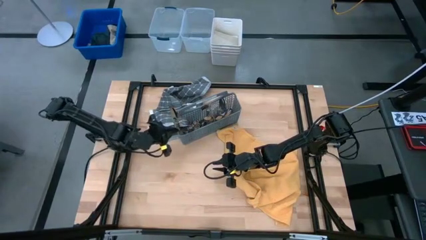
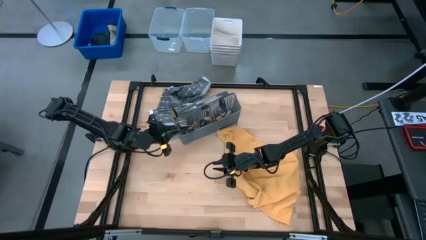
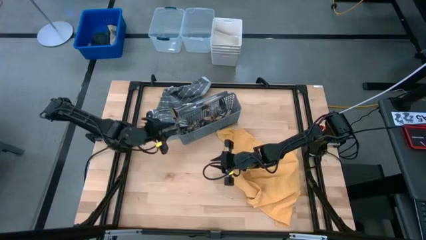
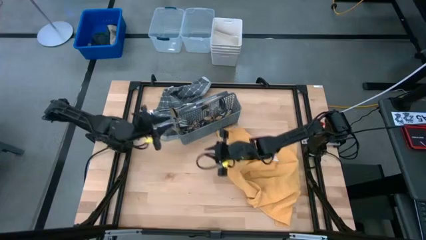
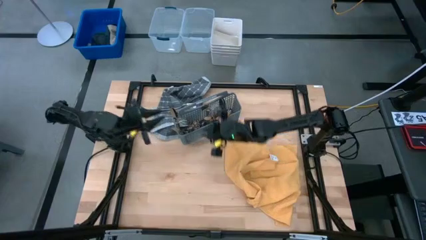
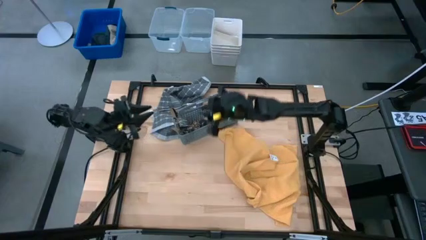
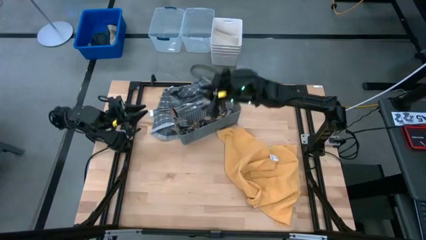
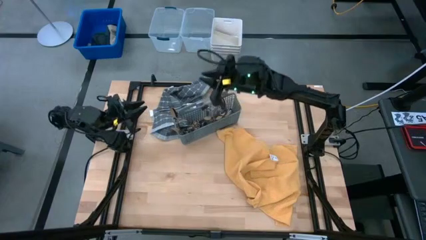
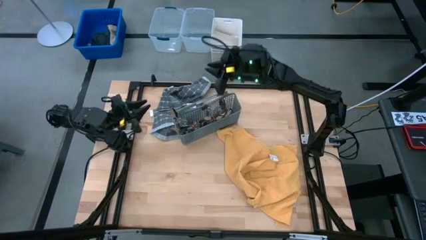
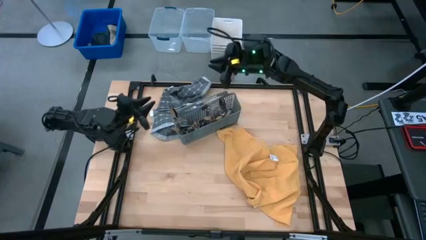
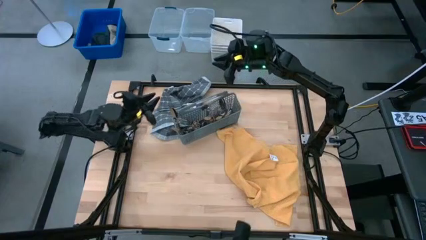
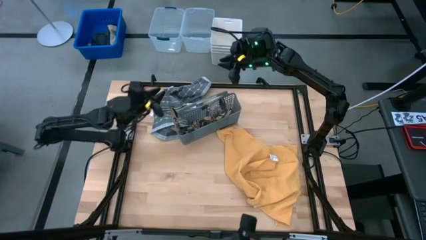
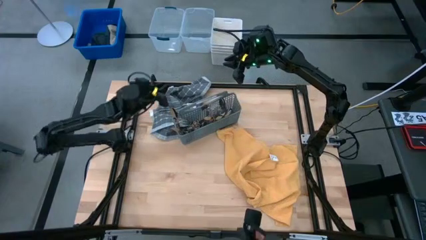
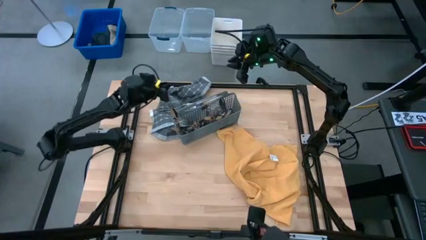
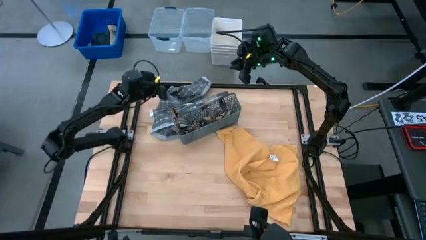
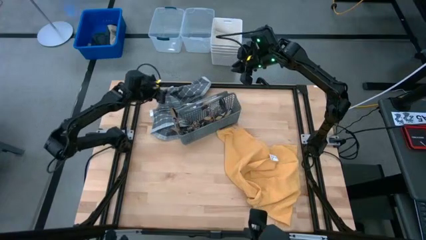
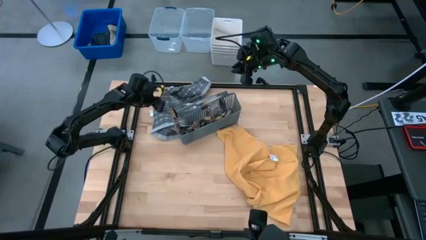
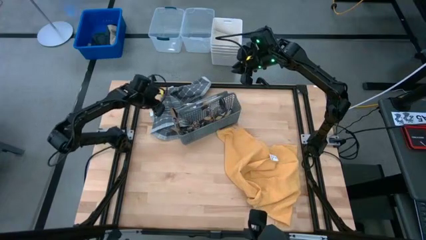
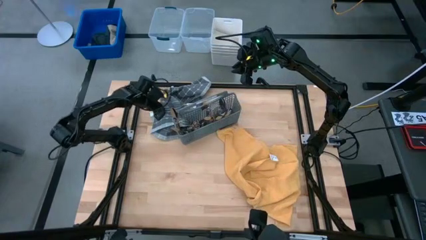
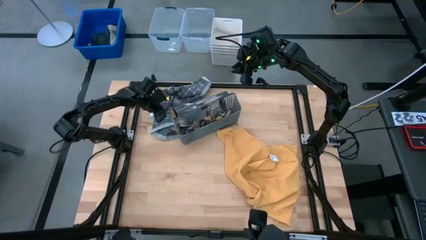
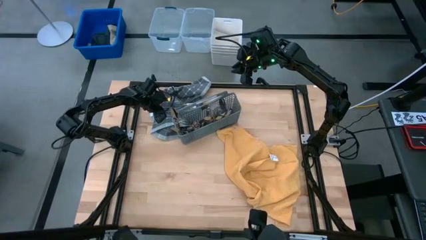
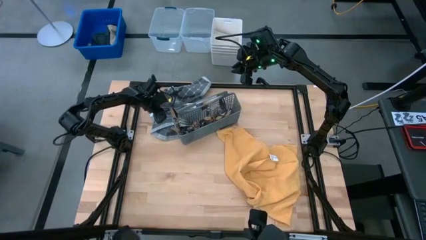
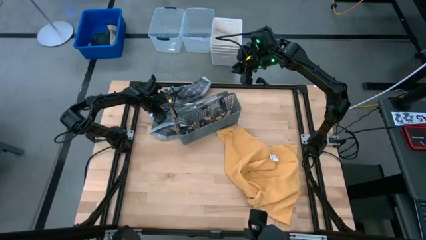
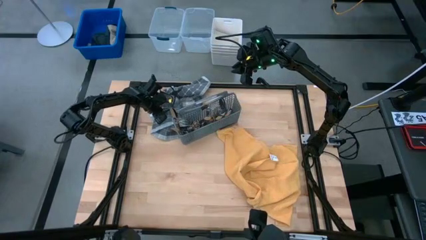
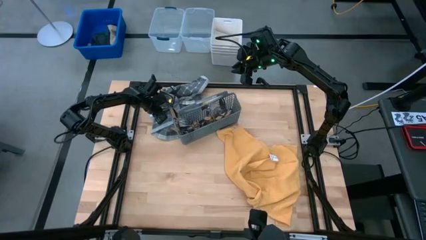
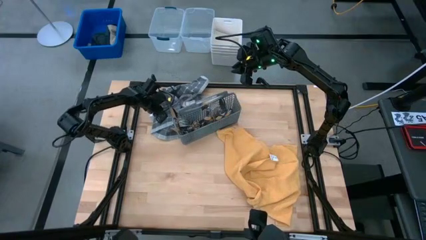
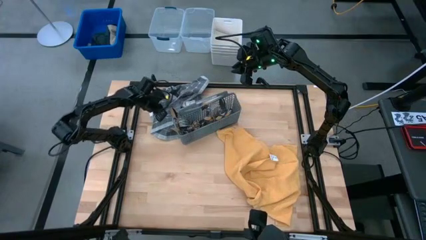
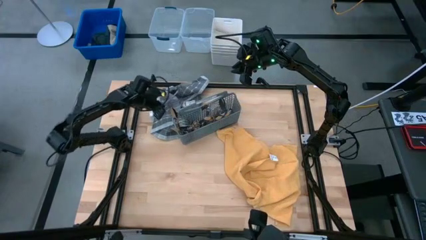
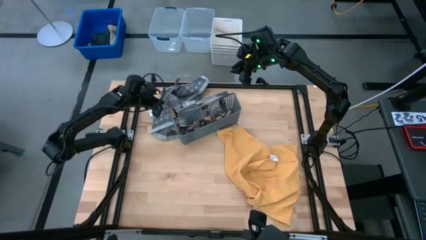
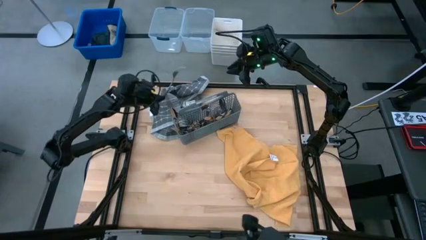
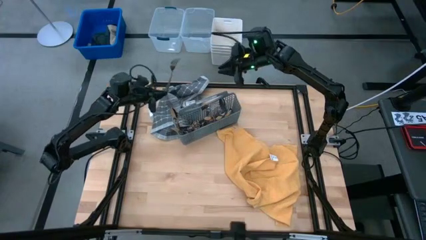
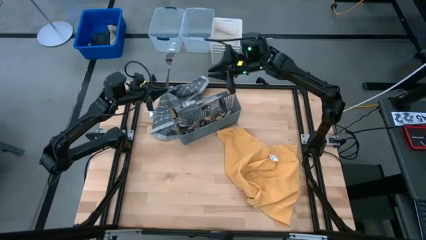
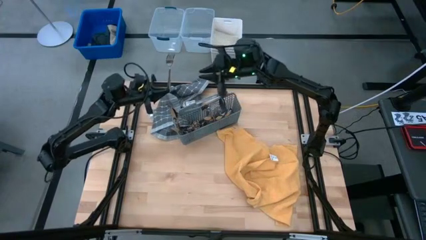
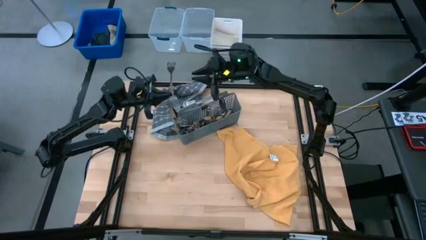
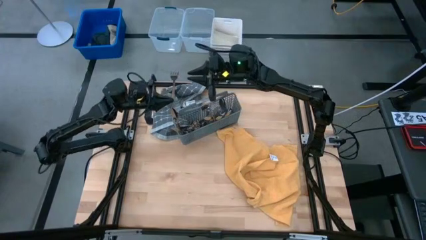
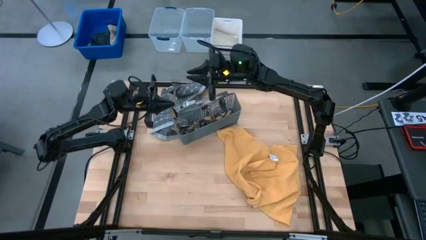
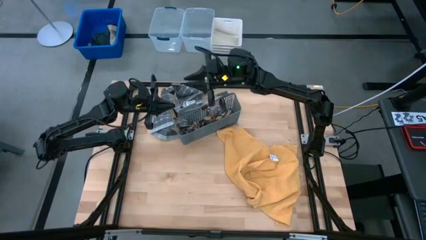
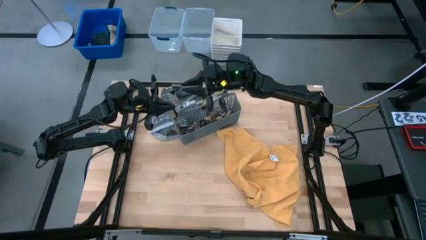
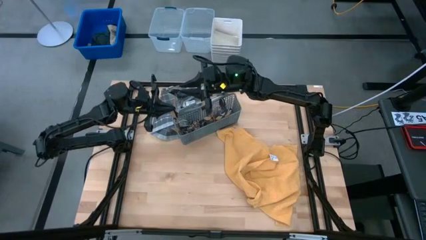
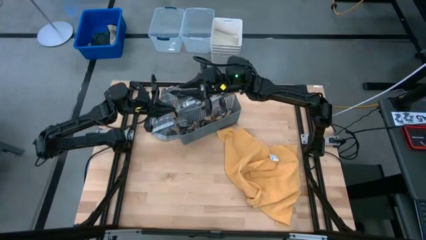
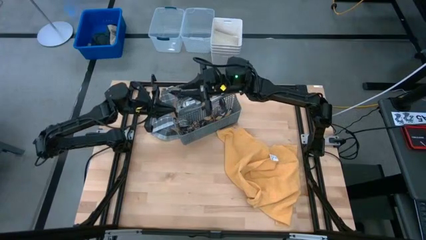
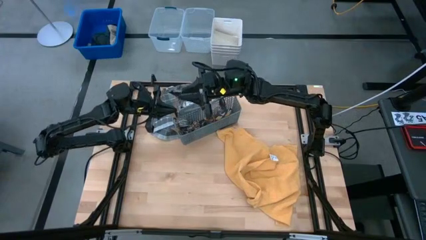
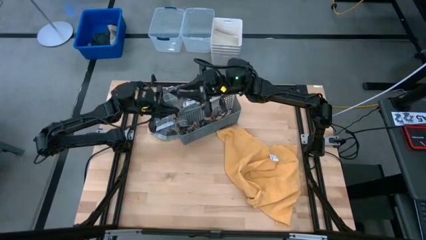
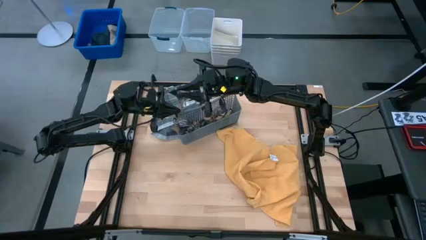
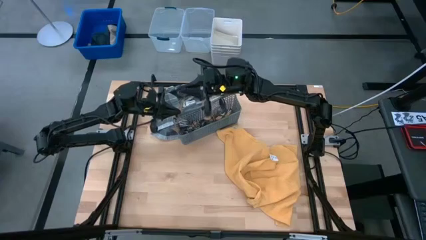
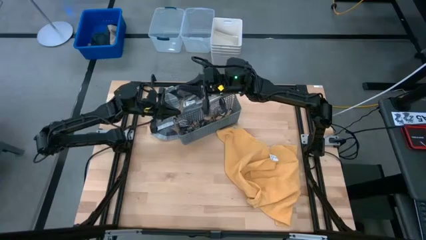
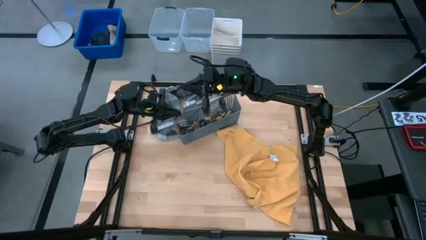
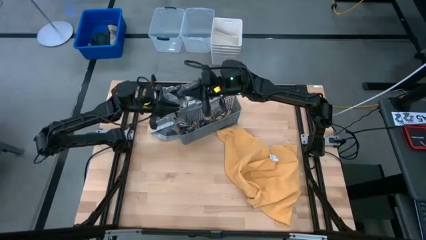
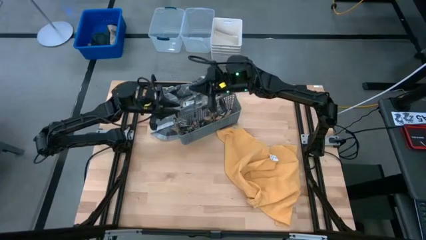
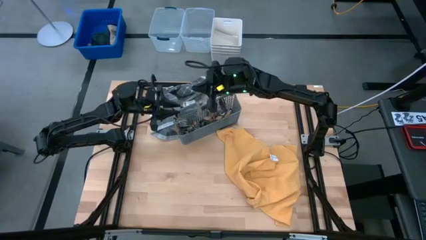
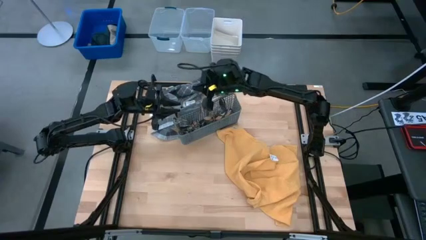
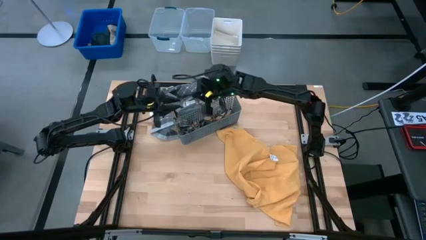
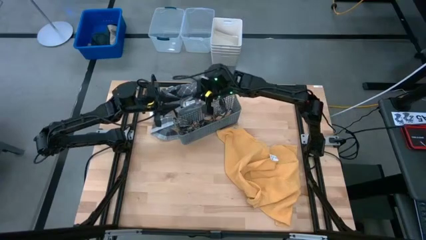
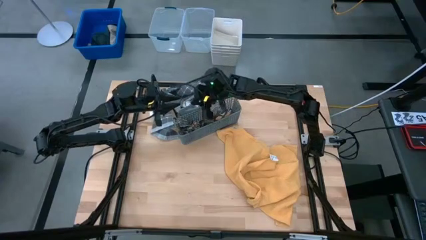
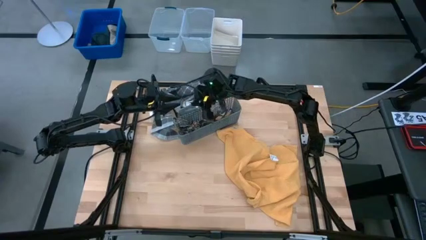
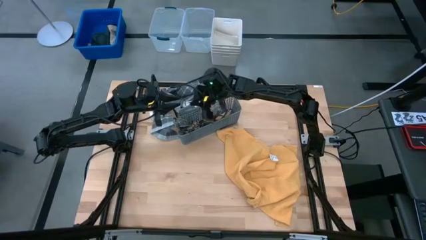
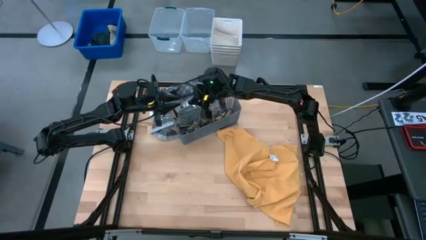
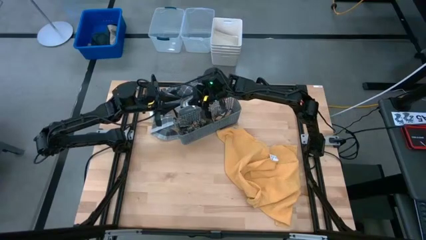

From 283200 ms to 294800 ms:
Task: Sort silverware
Put the silver fork into the gray silverware basket
